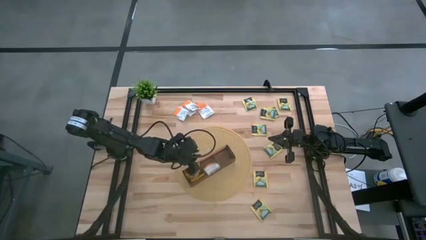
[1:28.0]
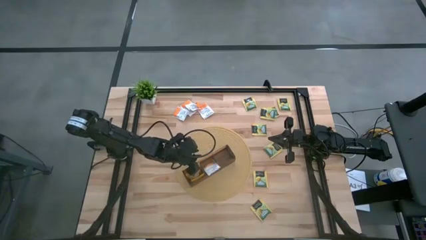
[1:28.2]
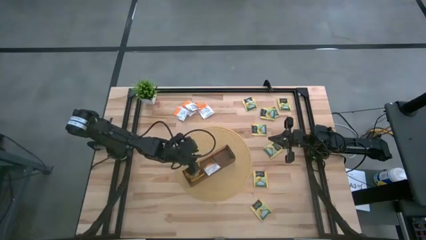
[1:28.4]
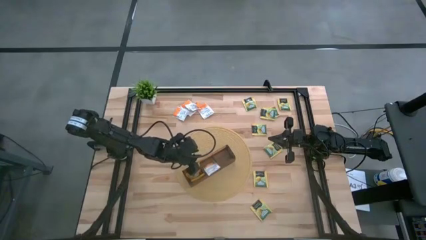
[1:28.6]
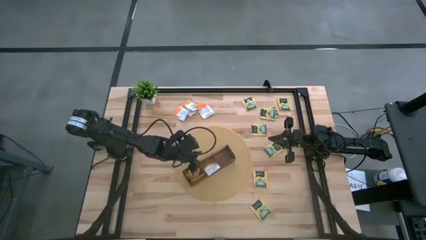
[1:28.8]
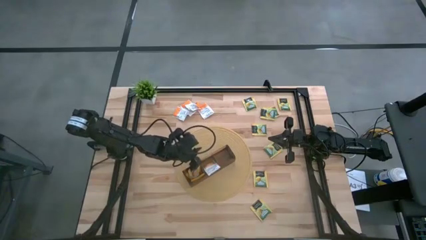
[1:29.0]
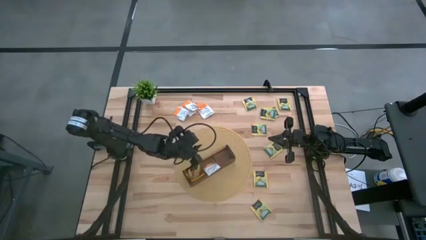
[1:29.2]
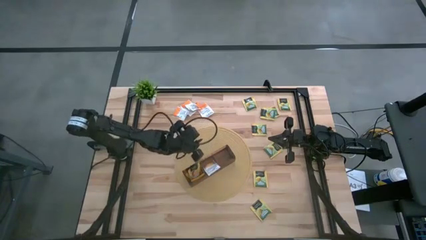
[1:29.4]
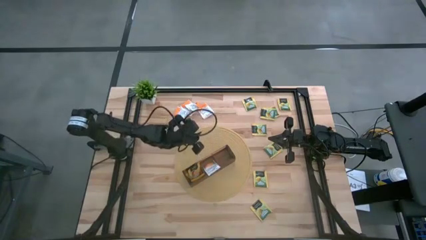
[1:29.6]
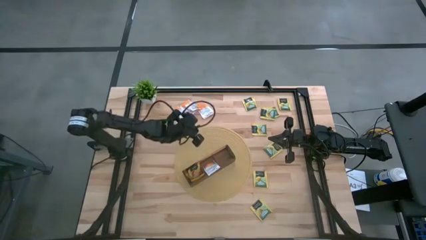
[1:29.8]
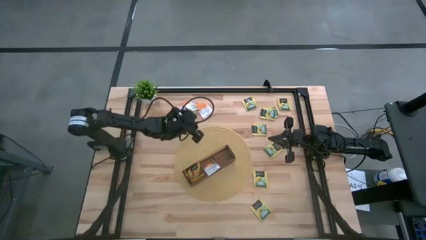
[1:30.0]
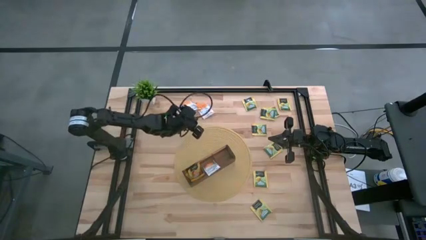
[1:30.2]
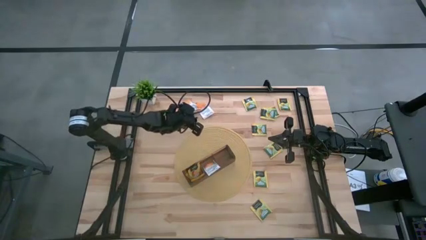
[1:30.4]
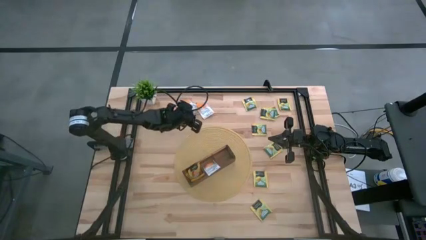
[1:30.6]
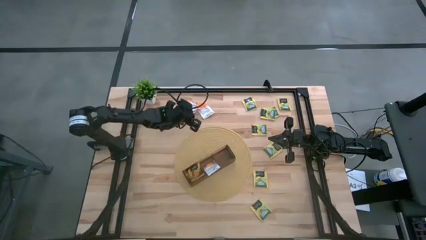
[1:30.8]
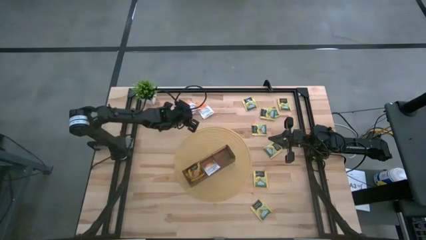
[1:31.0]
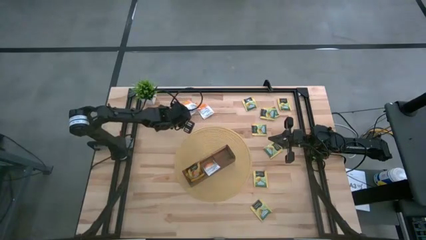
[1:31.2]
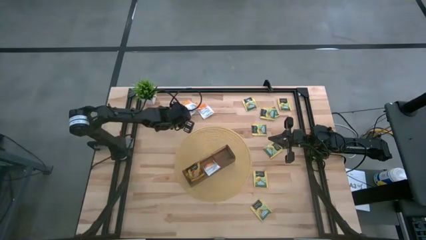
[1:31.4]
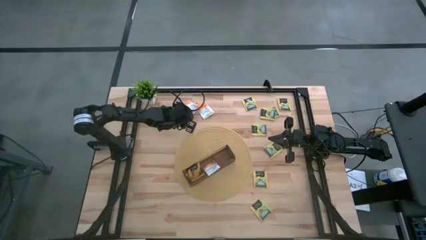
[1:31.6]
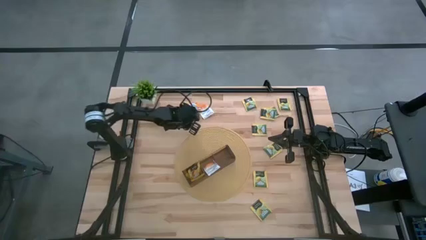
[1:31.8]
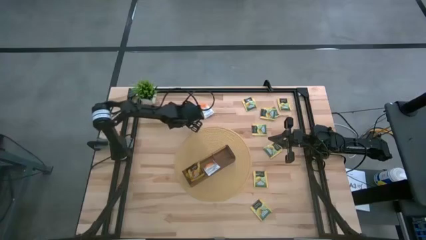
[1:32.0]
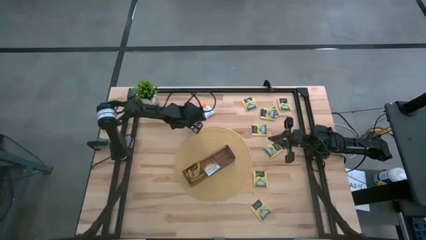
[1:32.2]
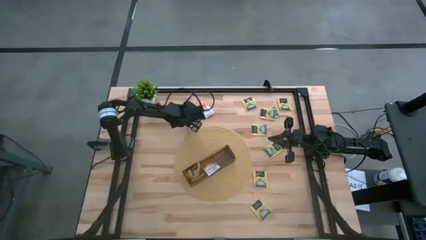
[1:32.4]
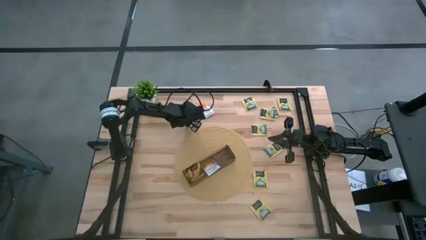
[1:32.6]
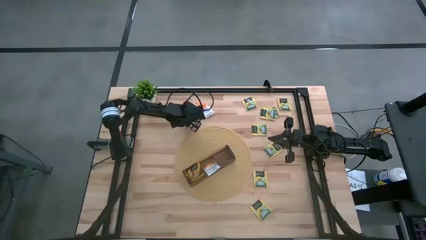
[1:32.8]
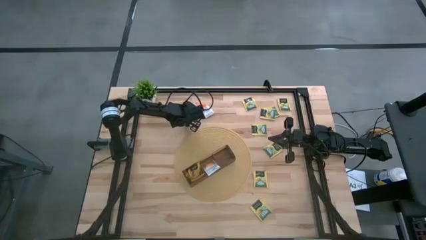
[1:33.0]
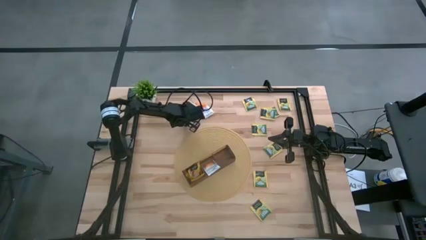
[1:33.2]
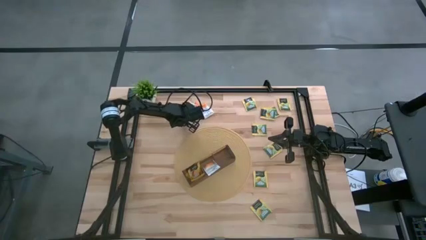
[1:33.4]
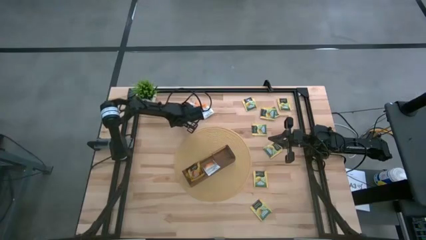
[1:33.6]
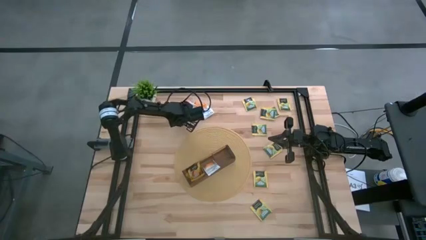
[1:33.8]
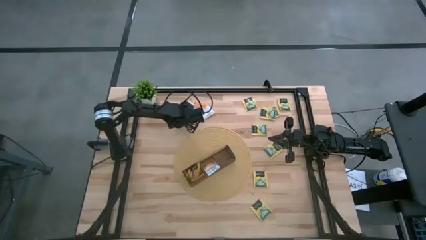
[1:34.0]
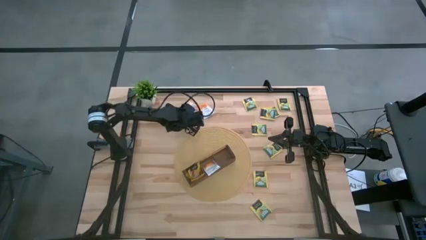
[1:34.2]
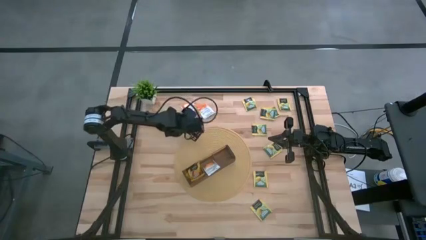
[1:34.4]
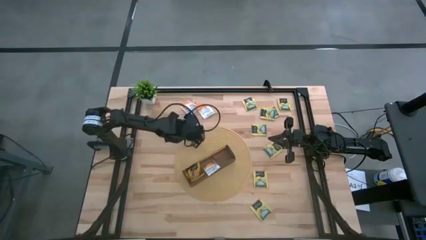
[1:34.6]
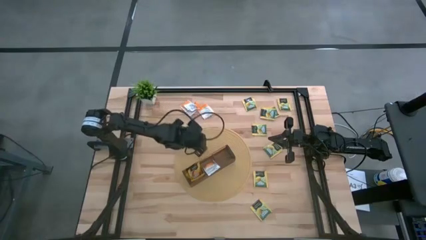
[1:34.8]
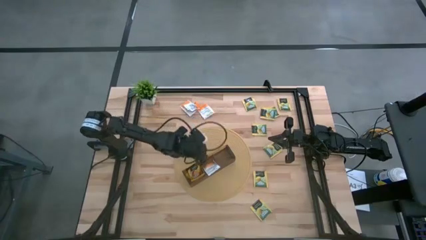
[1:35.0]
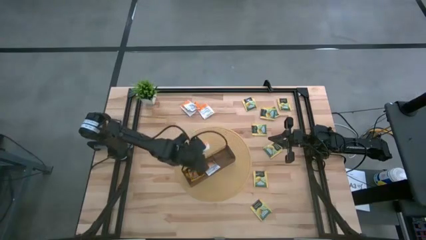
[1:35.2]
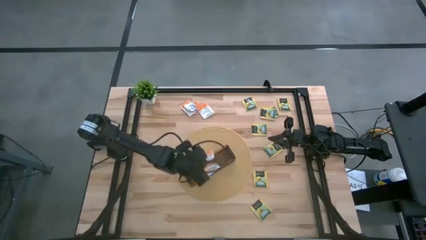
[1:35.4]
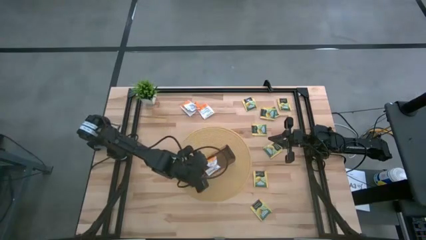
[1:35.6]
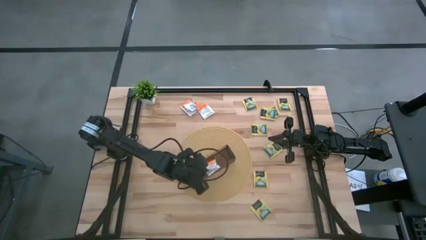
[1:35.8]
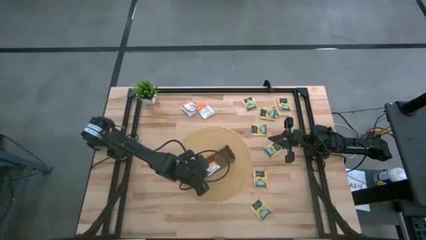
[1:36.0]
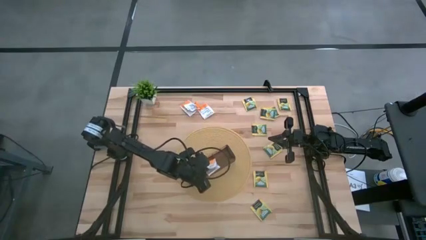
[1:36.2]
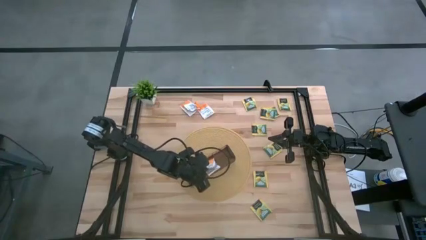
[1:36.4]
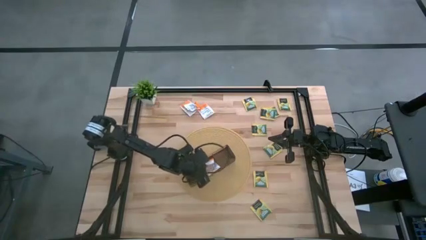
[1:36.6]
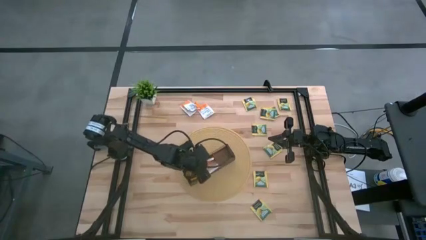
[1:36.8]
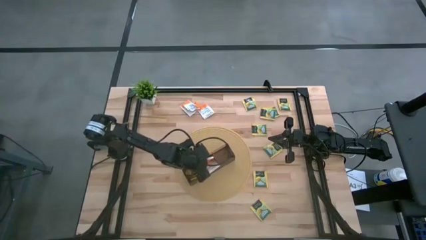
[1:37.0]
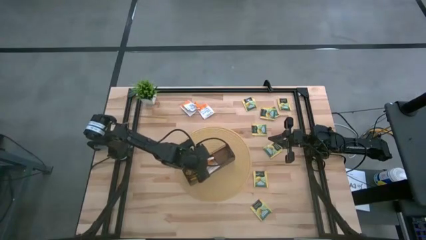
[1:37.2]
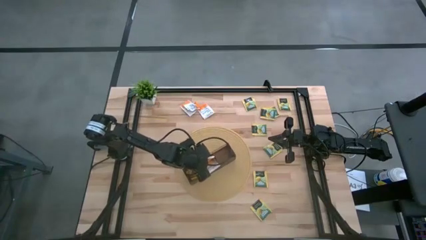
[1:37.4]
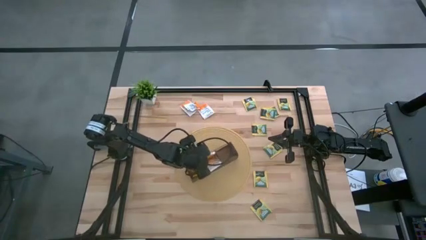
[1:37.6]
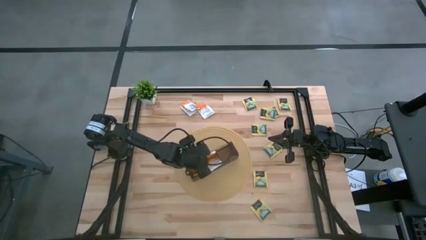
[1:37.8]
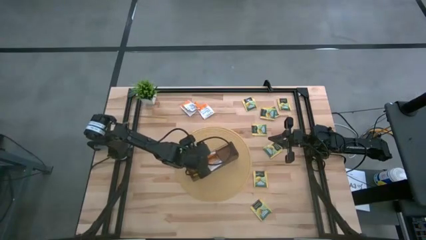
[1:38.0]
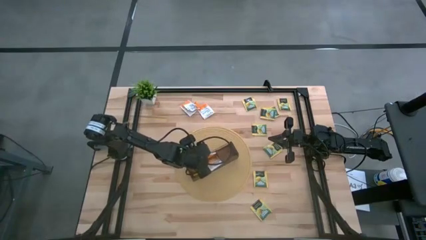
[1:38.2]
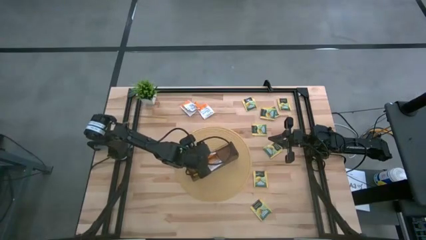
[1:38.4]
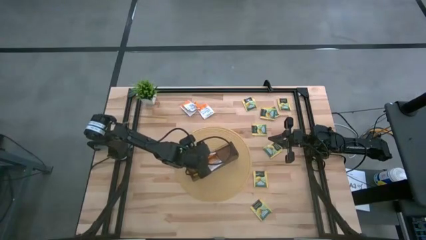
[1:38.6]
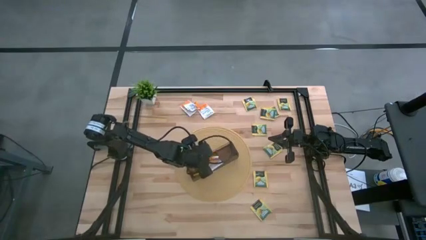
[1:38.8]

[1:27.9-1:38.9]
Task: Pick & Place Tea
Put the orange tea sachet into the mid section of the wooden organizer

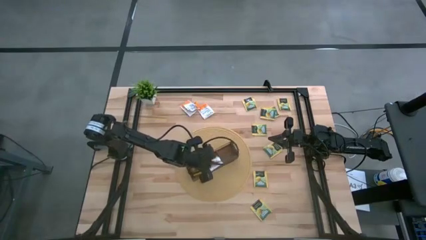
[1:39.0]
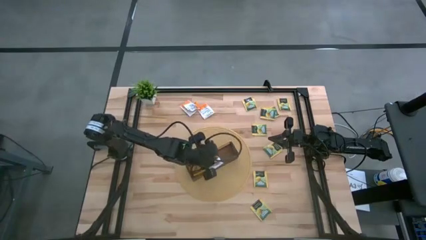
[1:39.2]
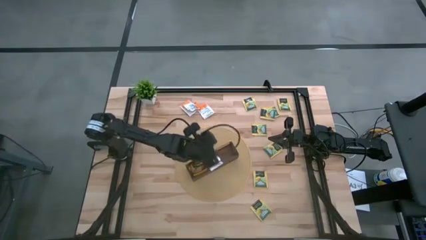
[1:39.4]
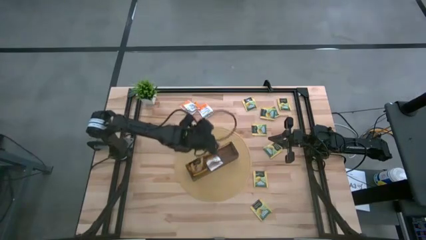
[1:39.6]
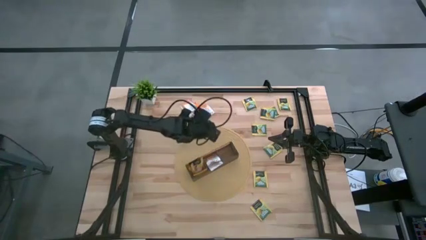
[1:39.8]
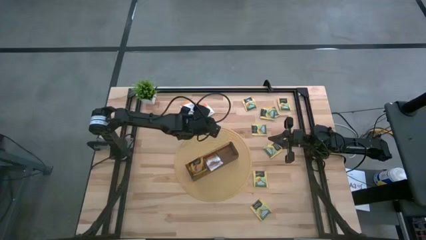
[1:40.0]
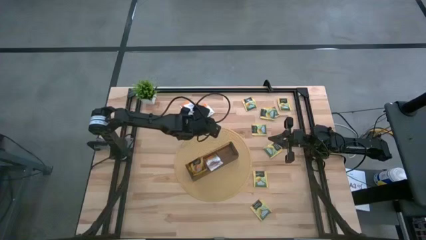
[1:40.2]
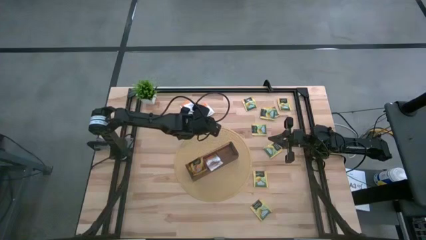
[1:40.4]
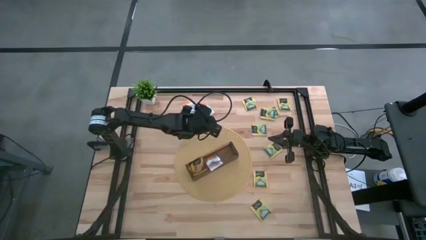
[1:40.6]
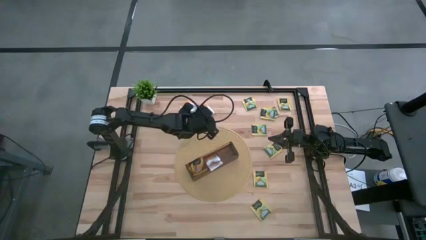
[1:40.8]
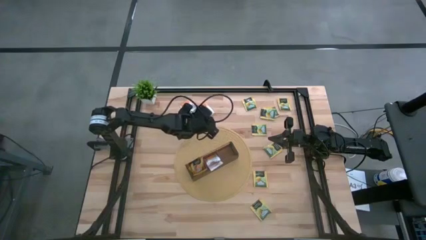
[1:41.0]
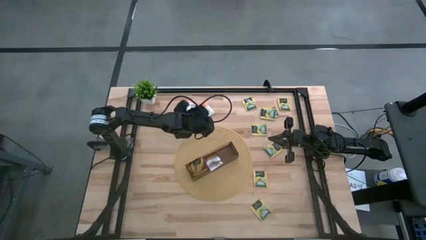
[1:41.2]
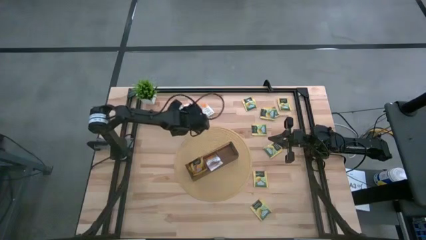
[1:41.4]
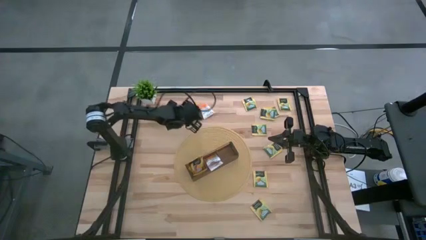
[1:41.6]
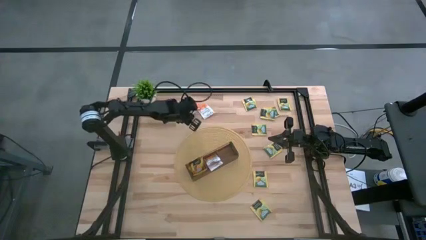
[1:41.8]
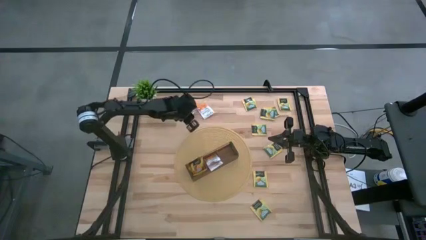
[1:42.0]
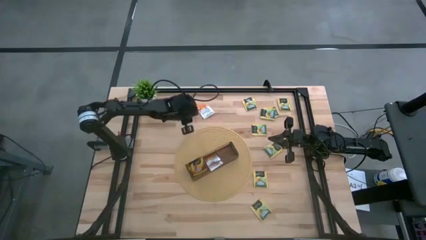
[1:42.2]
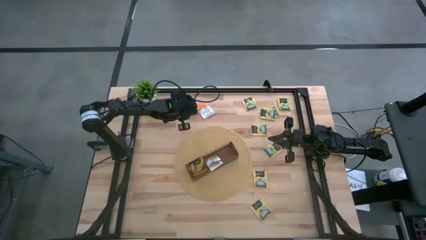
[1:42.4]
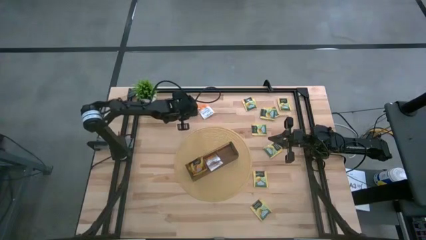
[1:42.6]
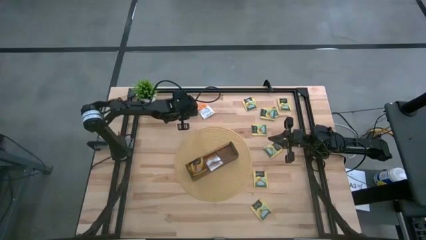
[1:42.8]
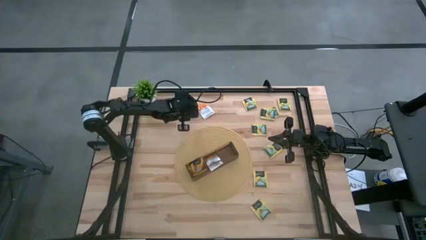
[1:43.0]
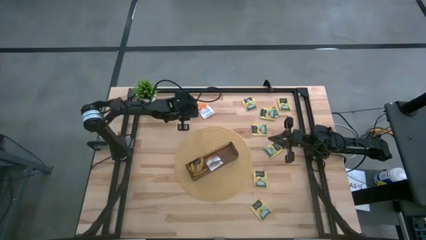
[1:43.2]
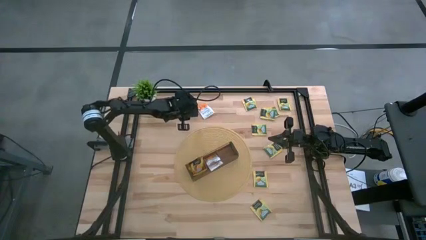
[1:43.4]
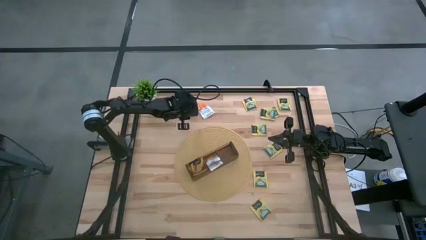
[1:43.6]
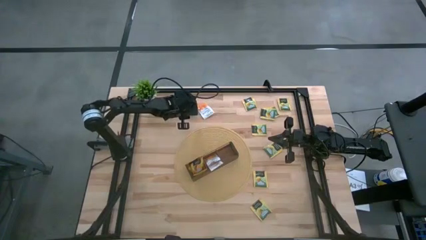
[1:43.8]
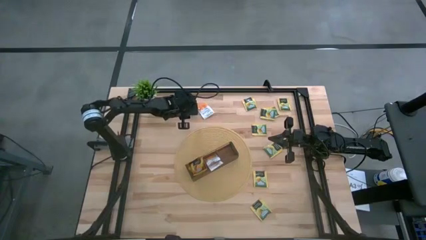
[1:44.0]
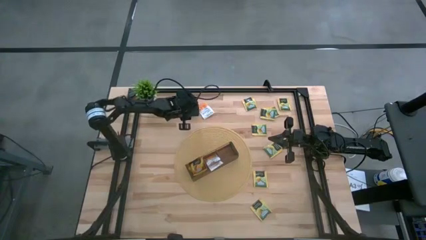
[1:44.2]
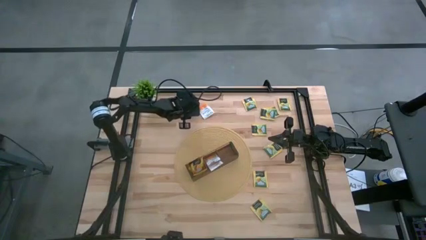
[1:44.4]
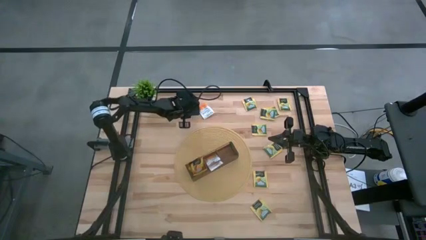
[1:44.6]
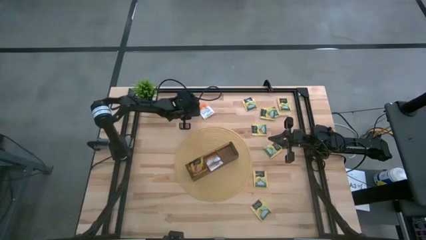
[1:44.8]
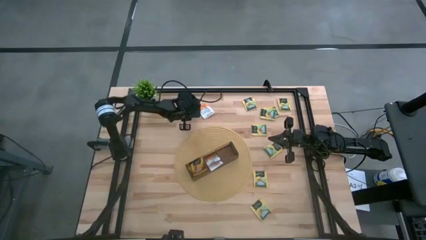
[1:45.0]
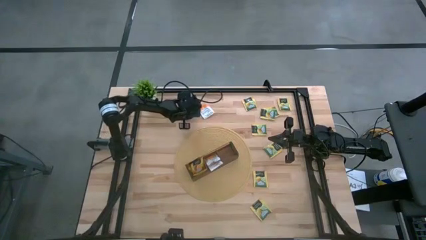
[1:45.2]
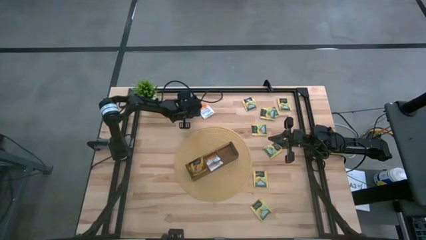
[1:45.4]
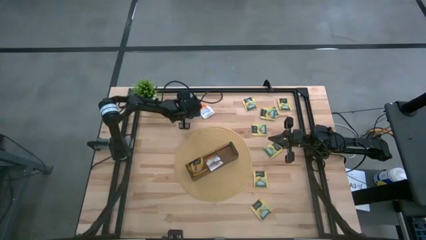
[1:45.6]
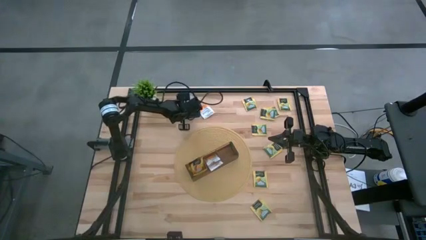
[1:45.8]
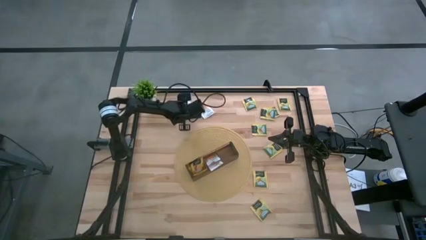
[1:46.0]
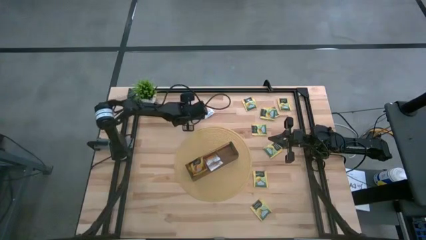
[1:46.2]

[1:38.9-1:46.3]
Put the middle orange tea sachet into the mid section of the wooden organizer
